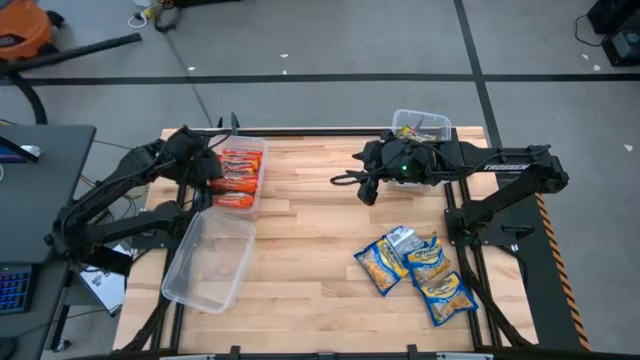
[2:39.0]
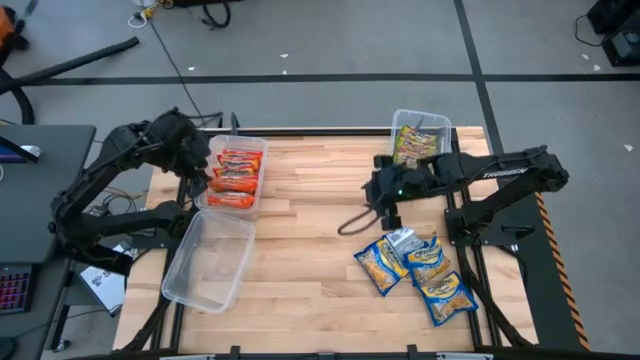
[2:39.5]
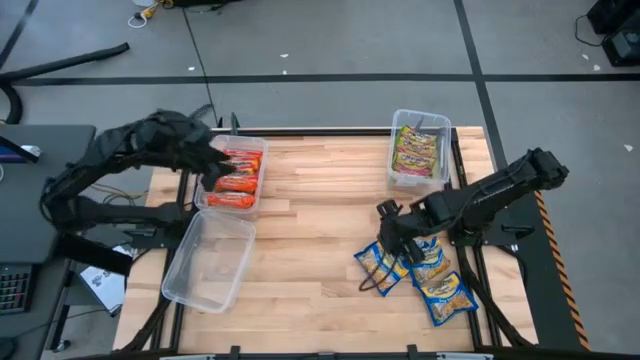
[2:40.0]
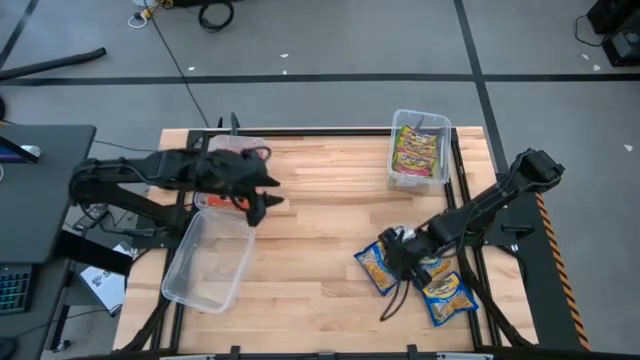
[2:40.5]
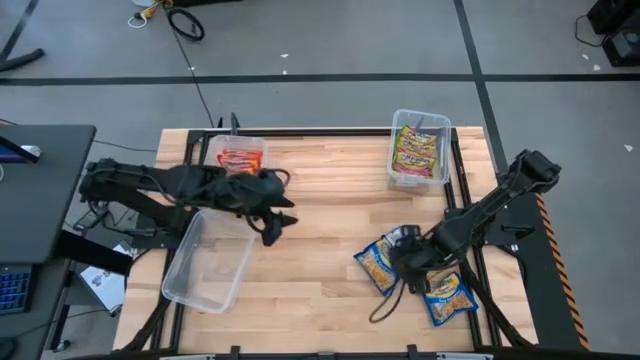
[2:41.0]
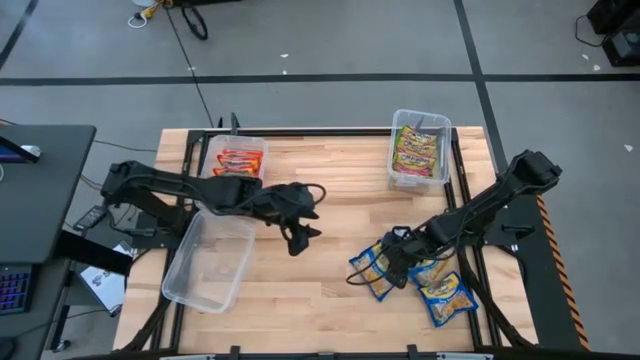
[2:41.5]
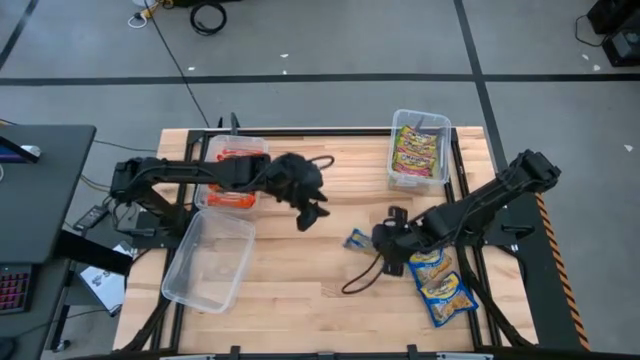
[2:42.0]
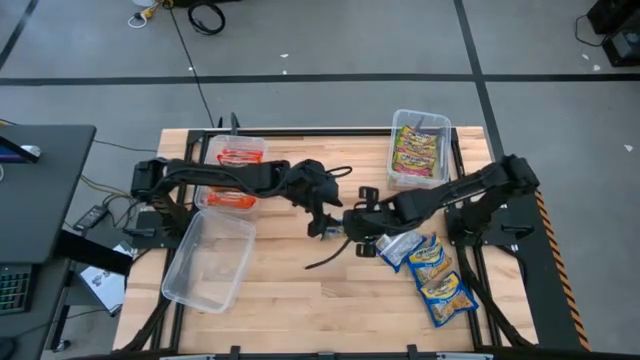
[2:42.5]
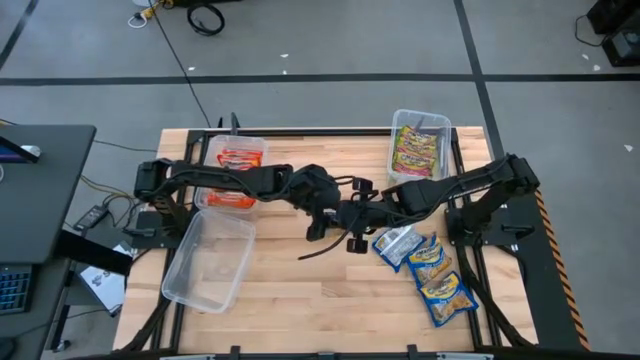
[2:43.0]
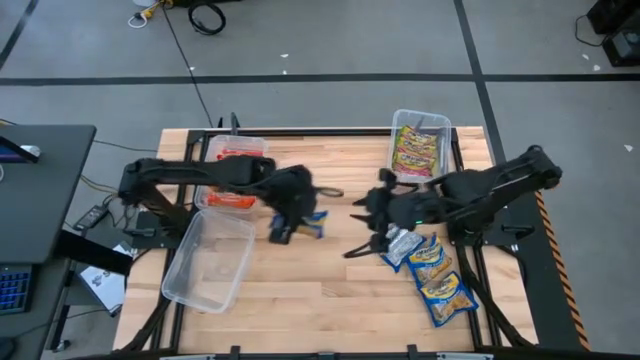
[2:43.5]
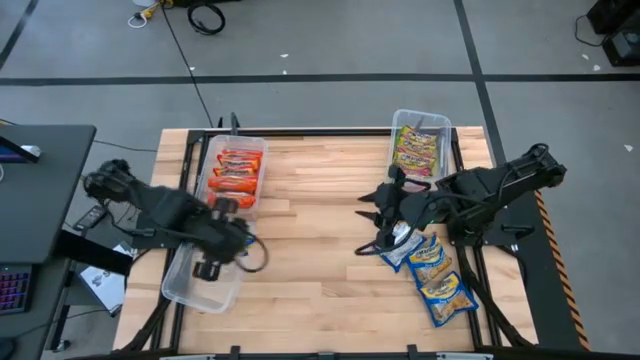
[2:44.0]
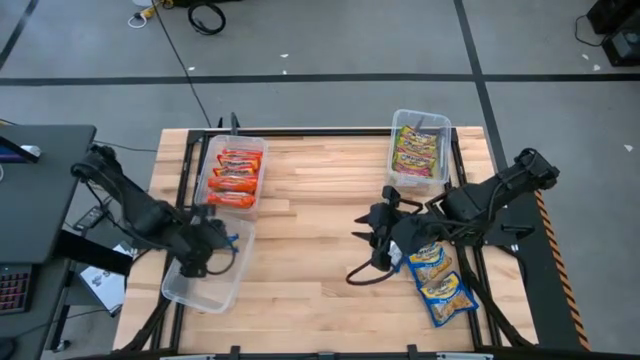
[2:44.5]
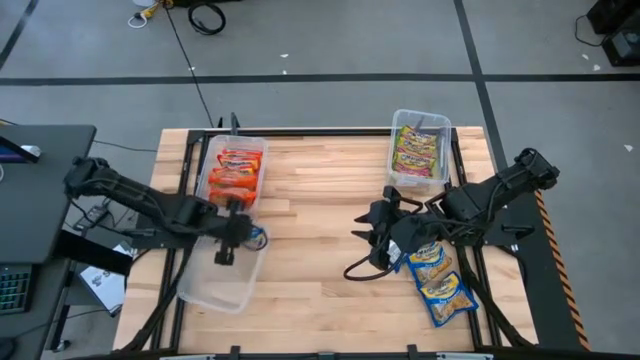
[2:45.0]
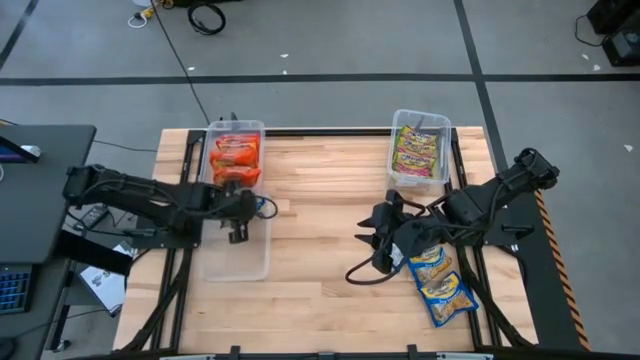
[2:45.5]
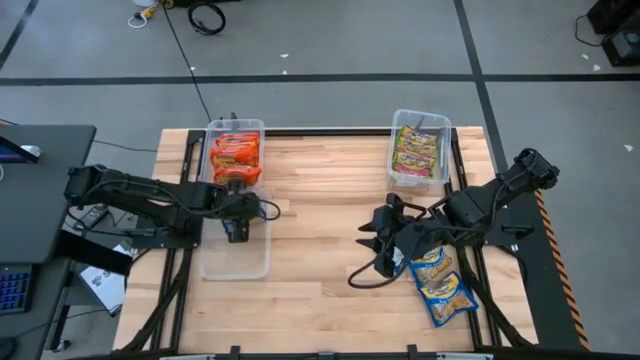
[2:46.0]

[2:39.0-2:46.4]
Task: Sort Maruchan noodles
Put the blue noodle pack into the bottom transparent bin

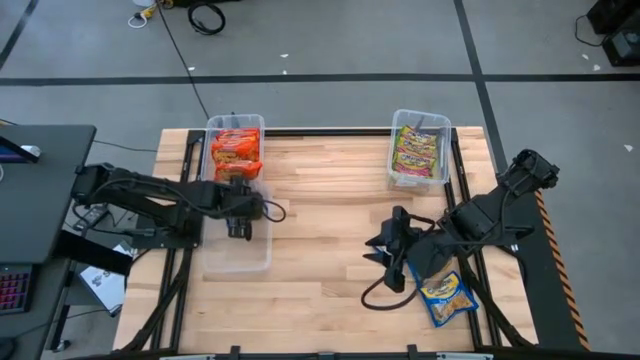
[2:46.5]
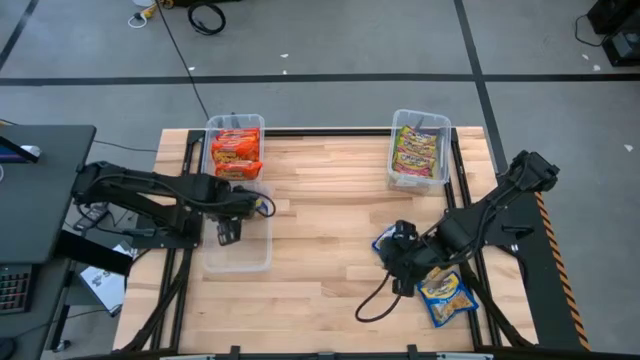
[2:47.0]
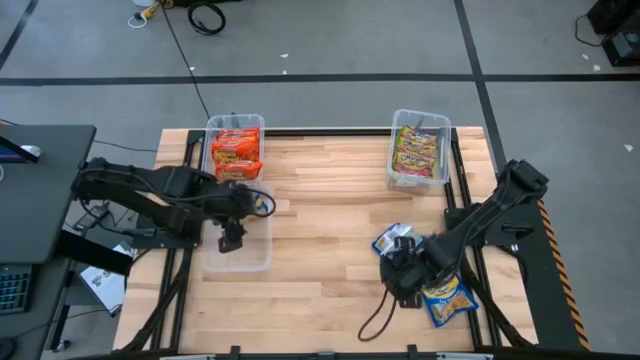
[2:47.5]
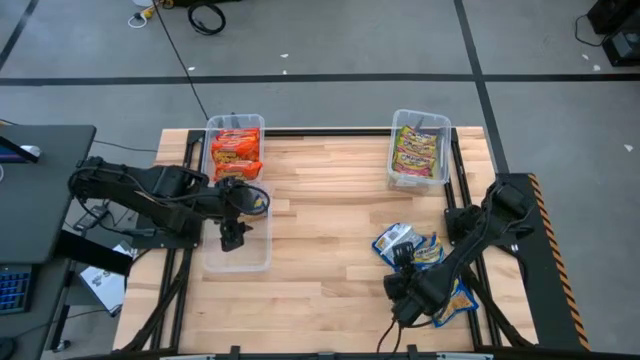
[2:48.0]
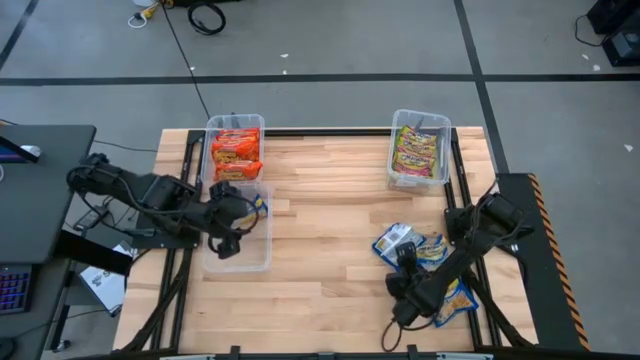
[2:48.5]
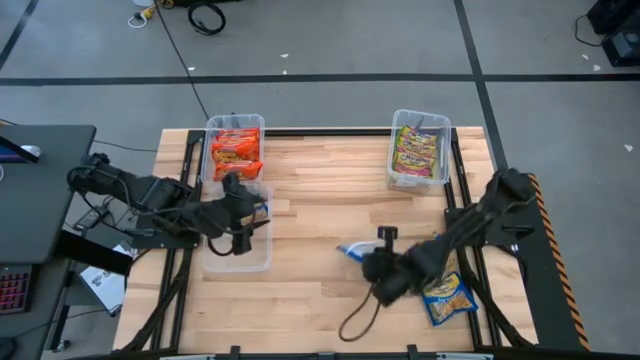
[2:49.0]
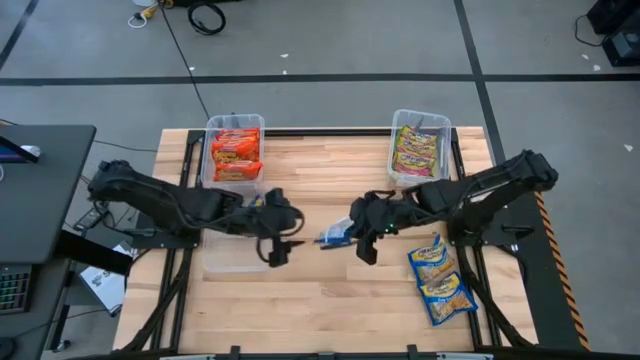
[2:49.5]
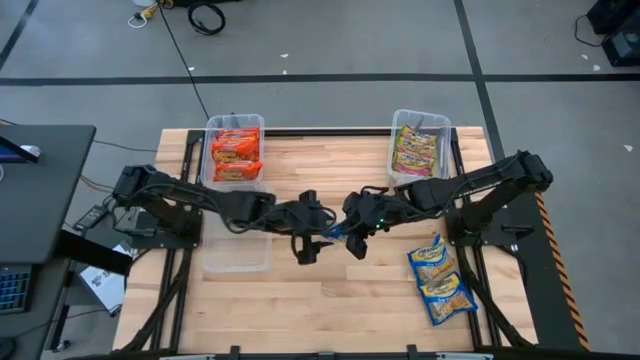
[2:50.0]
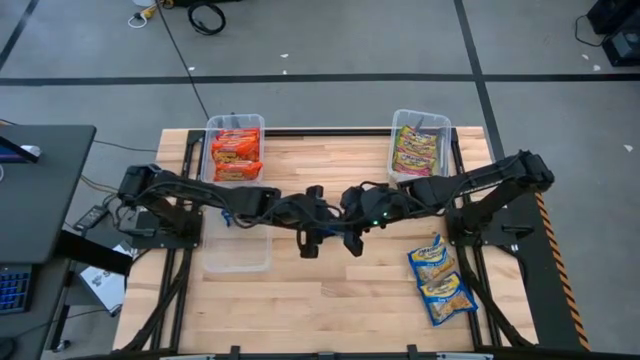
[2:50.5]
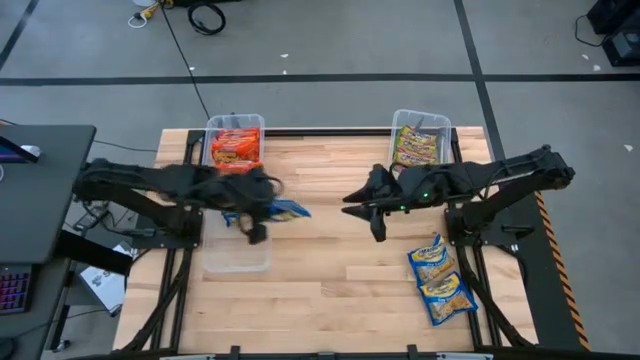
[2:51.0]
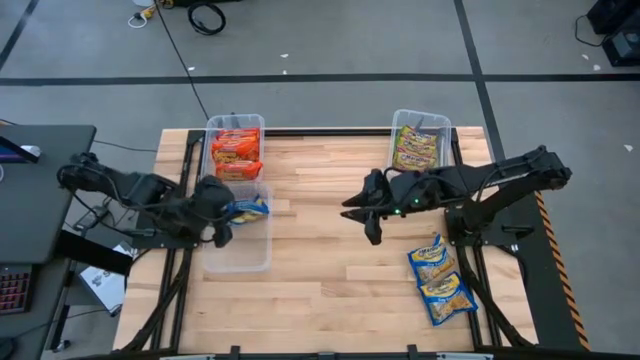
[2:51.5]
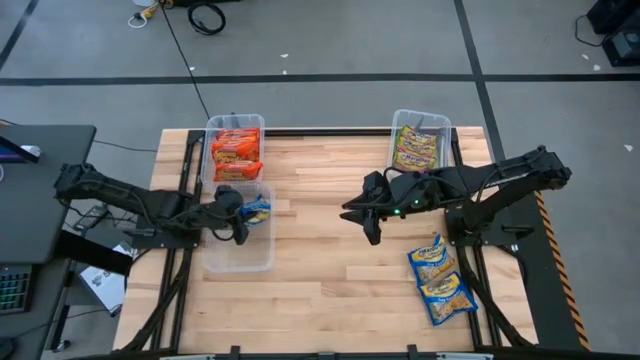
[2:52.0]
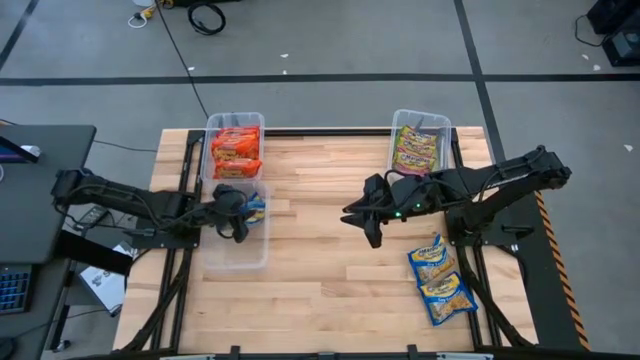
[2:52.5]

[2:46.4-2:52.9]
Put the blue noodle pack into the bottom transparent bin

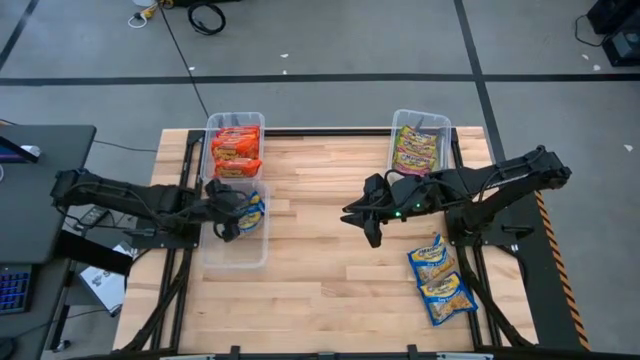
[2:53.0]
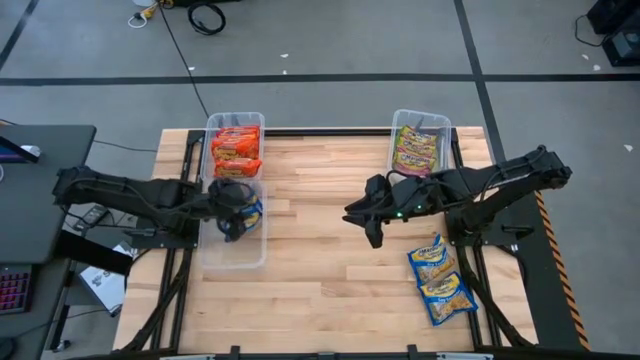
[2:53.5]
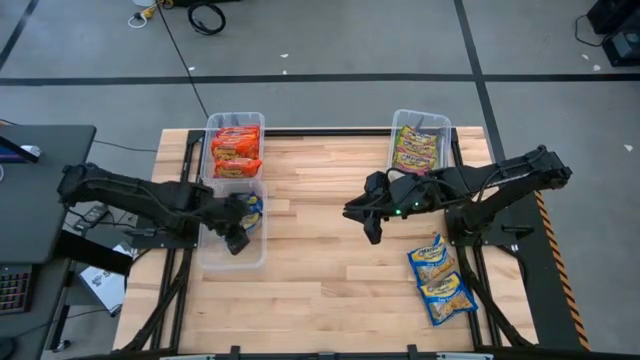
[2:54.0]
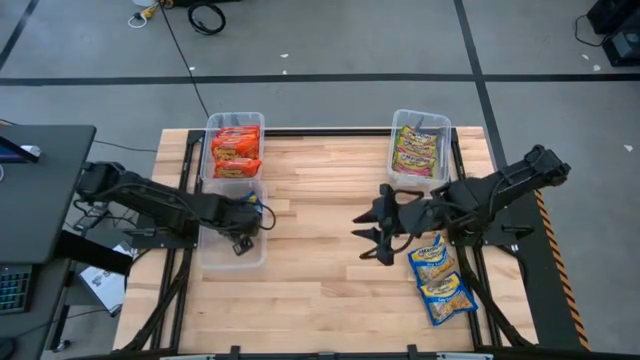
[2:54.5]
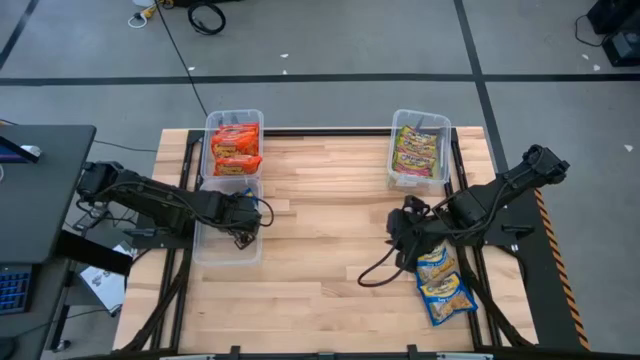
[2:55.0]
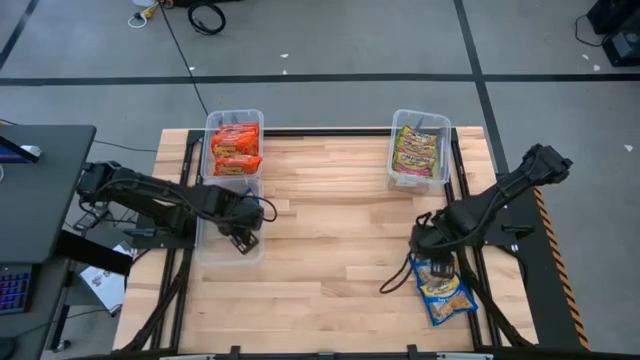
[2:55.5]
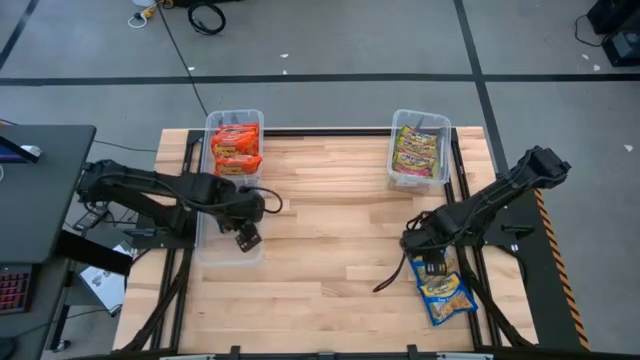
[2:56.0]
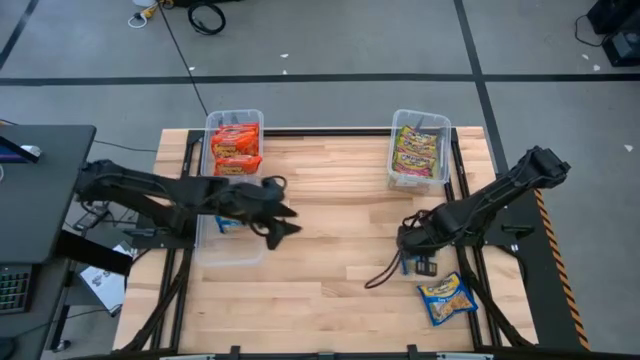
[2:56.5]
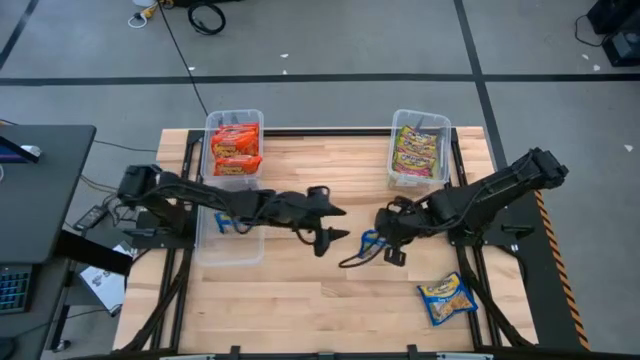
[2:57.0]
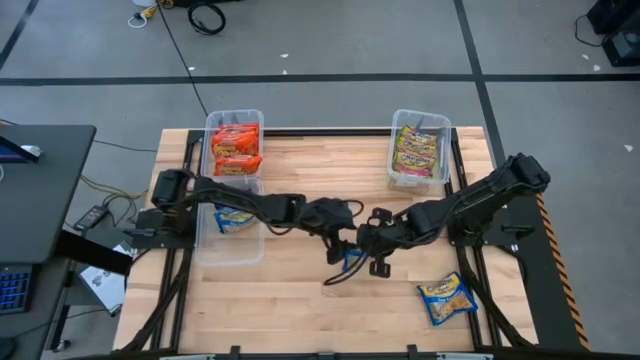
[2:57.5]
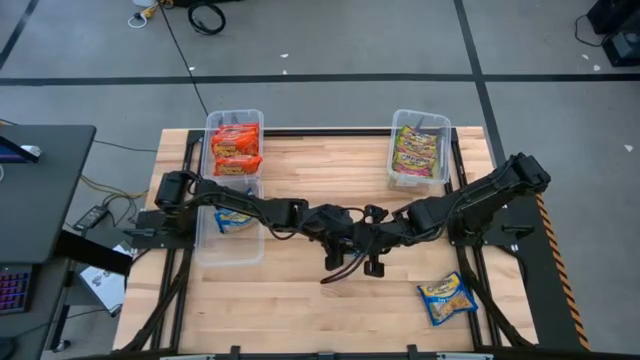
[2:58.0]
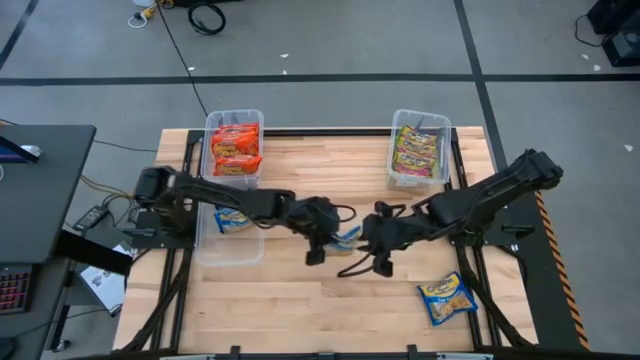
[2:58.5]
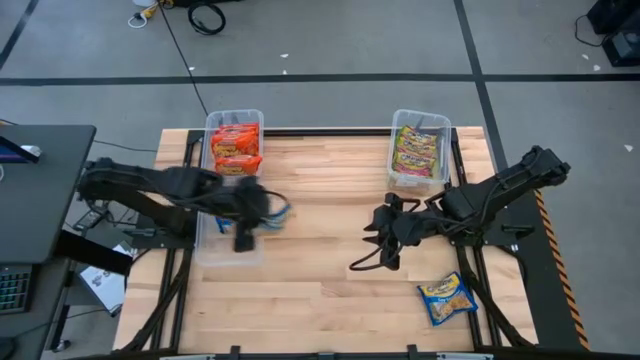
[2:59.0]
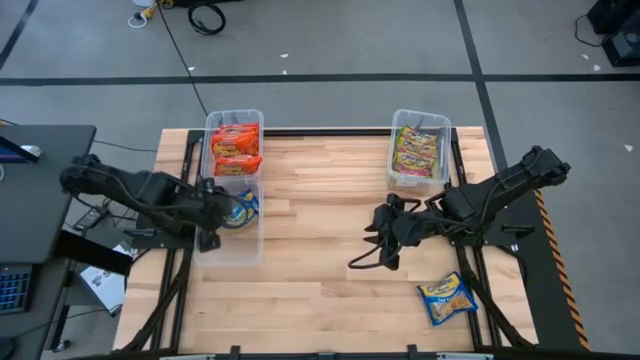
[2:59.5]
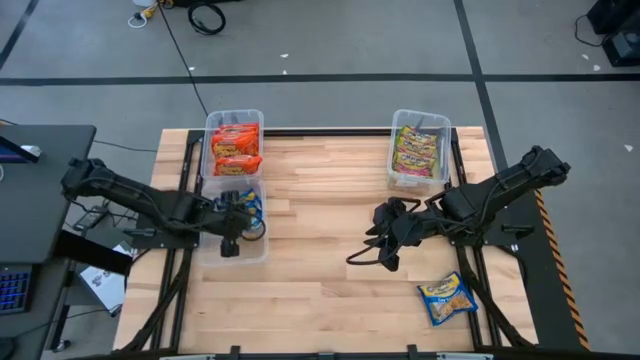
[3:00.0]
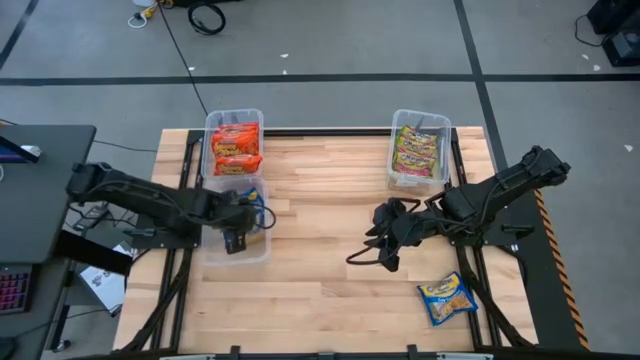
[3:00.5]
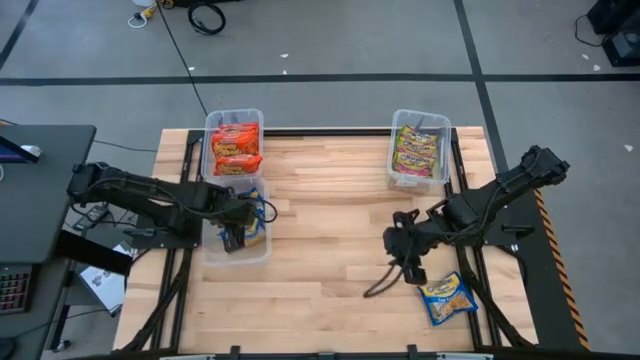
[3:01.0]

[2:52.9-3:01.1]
Put the blue noodle pack into the bottom transparent bin
